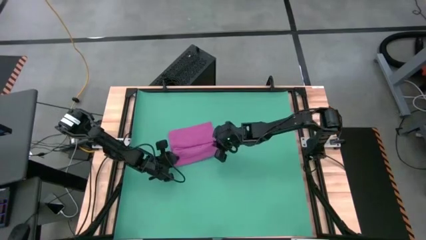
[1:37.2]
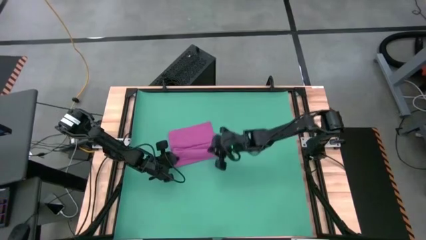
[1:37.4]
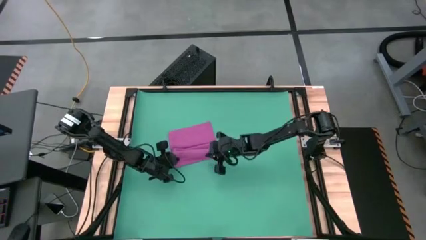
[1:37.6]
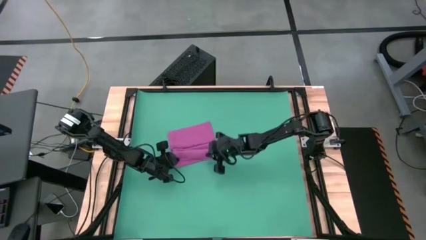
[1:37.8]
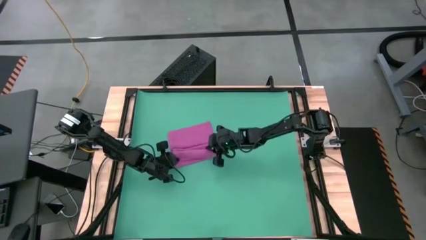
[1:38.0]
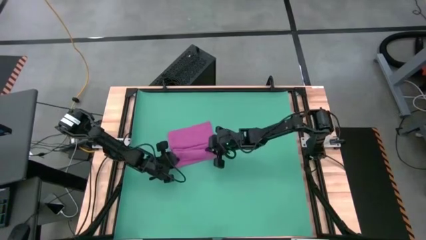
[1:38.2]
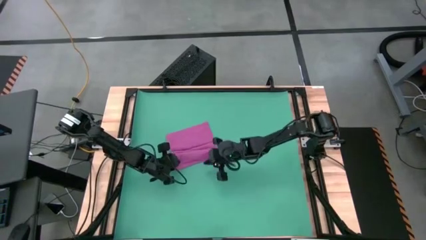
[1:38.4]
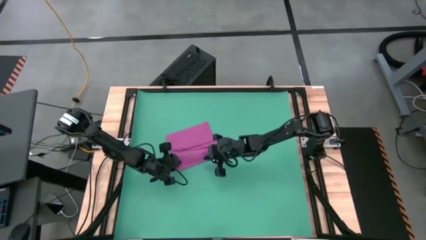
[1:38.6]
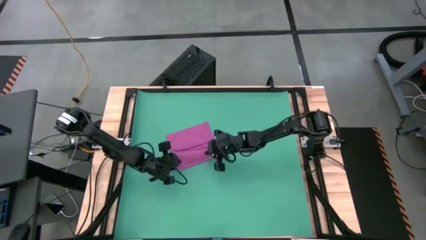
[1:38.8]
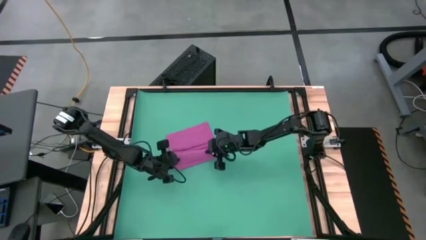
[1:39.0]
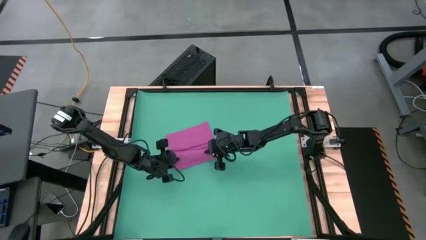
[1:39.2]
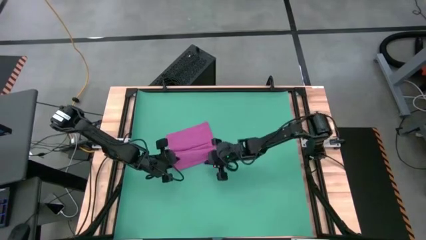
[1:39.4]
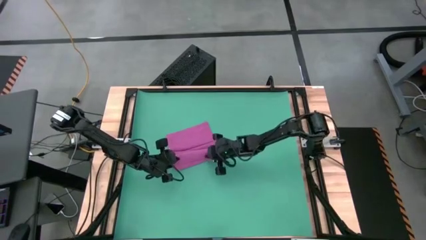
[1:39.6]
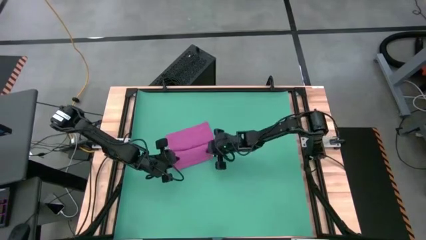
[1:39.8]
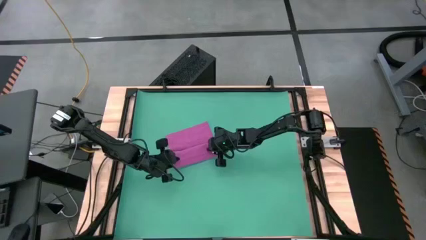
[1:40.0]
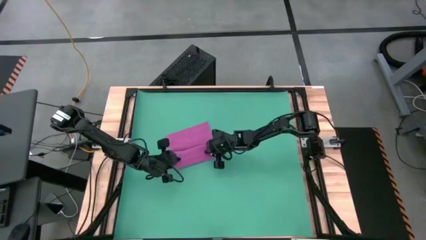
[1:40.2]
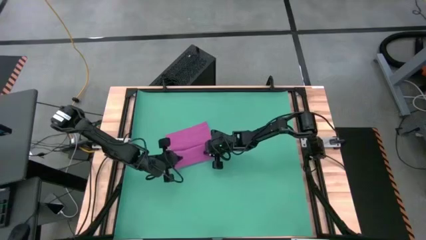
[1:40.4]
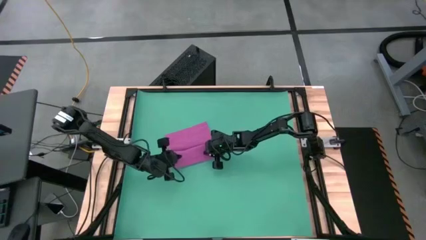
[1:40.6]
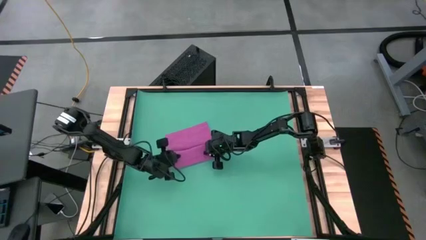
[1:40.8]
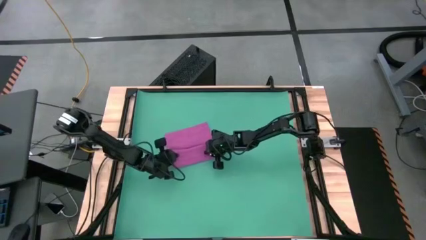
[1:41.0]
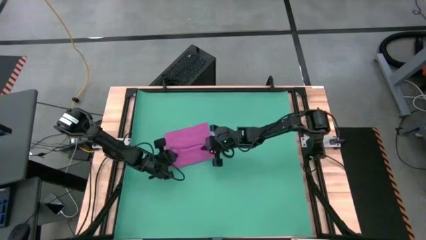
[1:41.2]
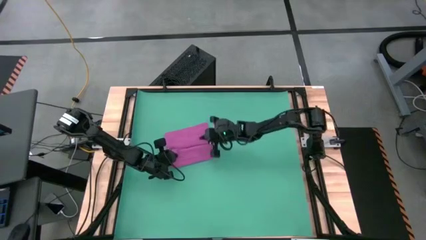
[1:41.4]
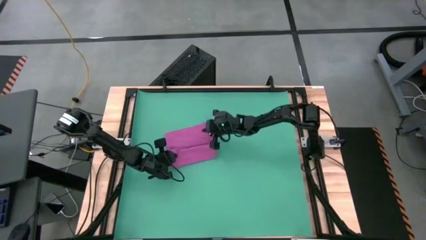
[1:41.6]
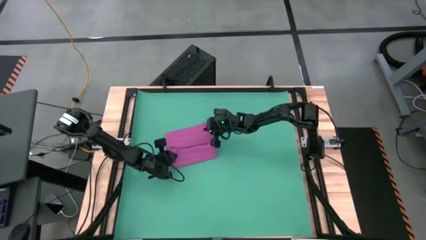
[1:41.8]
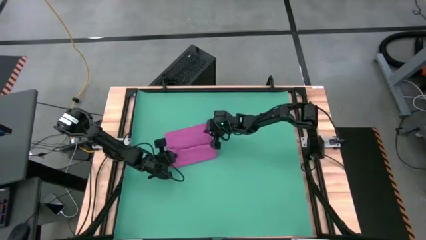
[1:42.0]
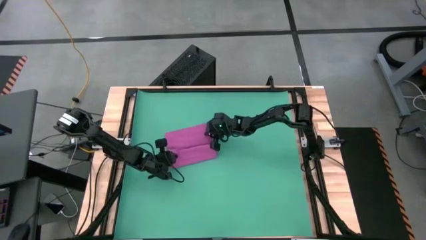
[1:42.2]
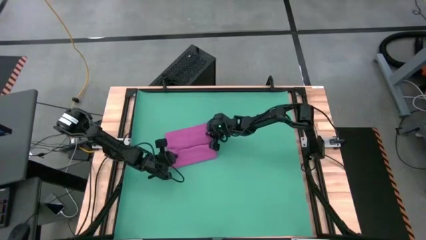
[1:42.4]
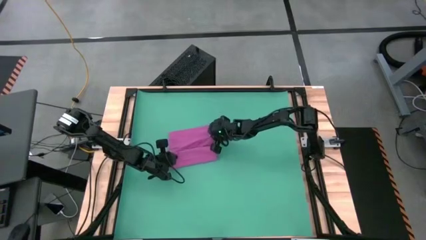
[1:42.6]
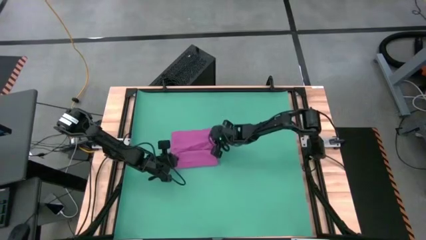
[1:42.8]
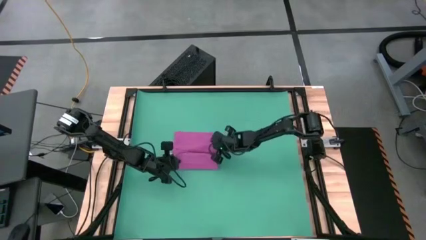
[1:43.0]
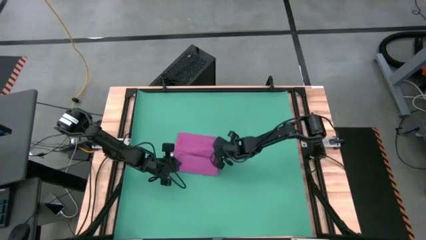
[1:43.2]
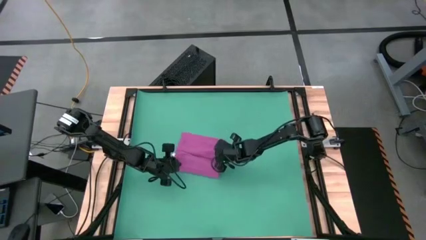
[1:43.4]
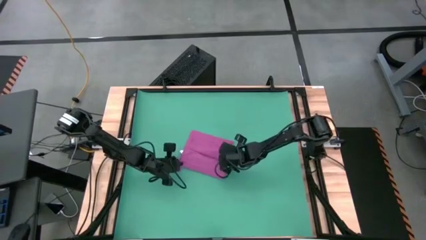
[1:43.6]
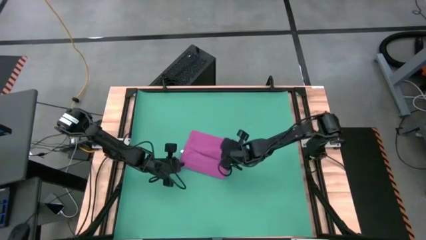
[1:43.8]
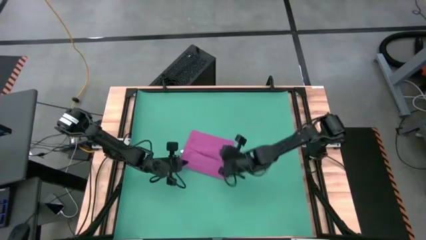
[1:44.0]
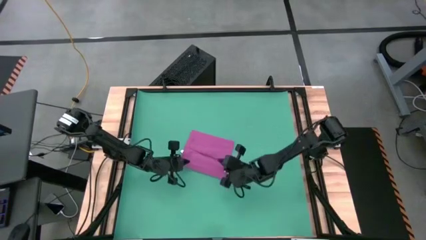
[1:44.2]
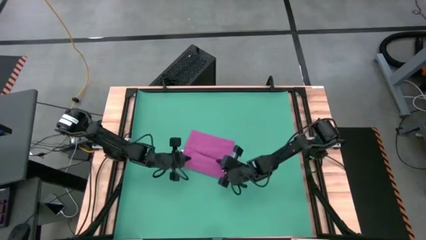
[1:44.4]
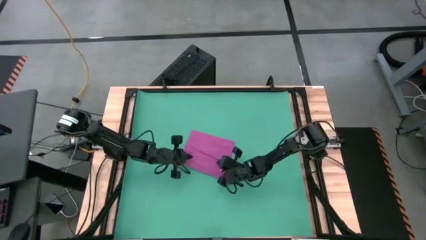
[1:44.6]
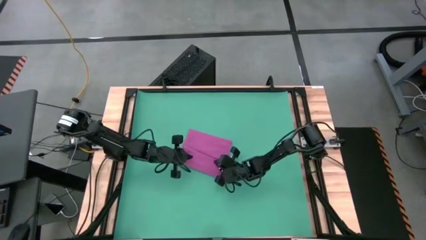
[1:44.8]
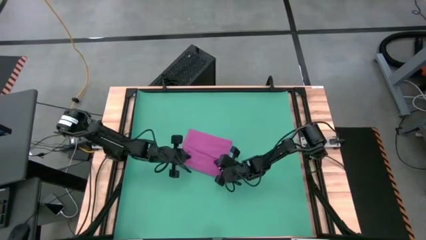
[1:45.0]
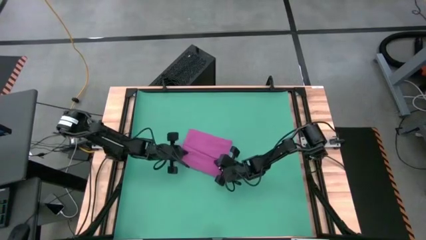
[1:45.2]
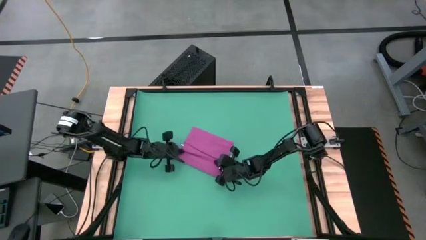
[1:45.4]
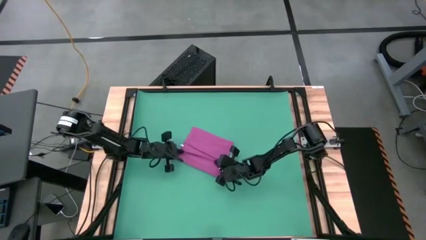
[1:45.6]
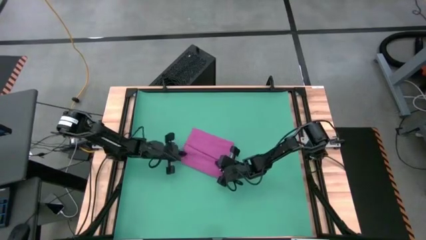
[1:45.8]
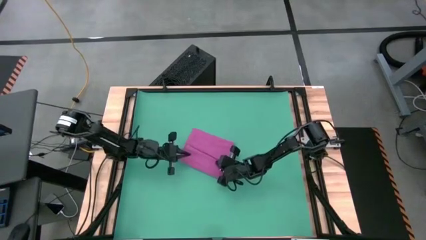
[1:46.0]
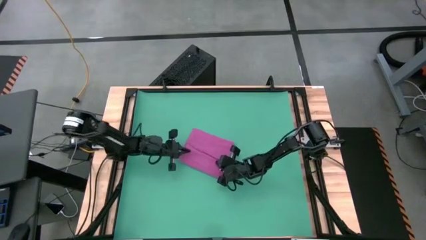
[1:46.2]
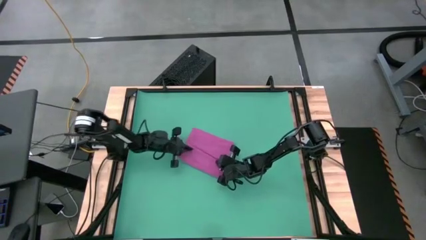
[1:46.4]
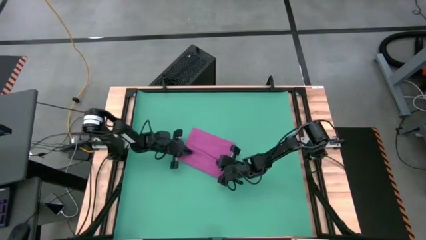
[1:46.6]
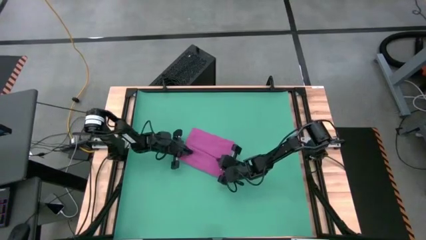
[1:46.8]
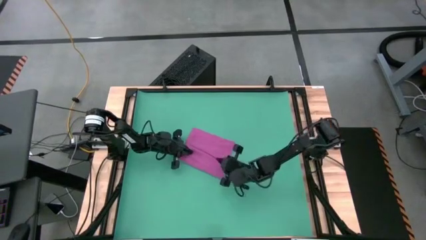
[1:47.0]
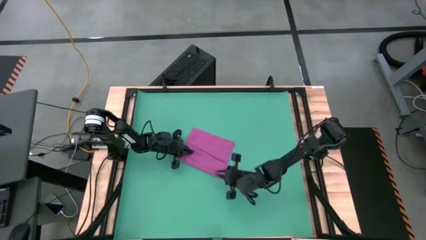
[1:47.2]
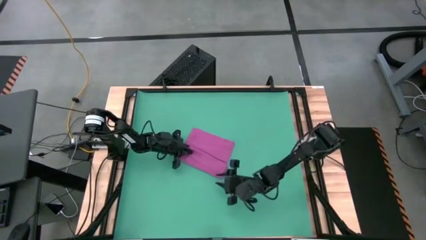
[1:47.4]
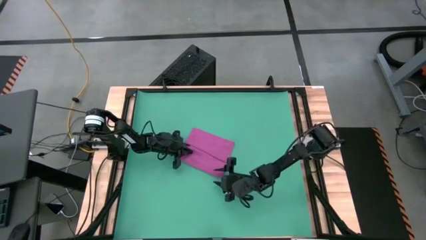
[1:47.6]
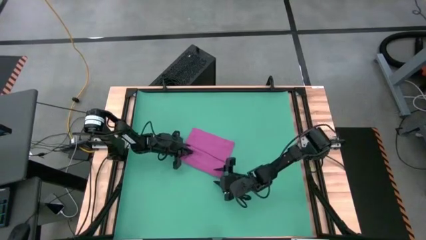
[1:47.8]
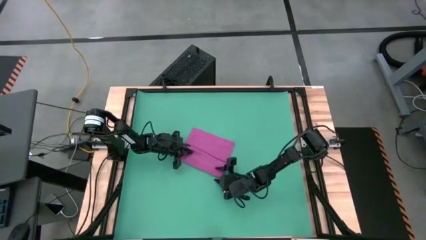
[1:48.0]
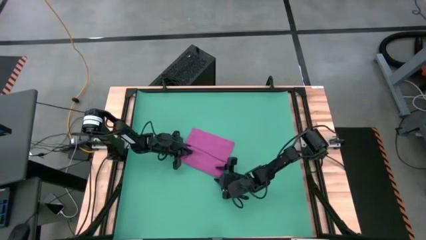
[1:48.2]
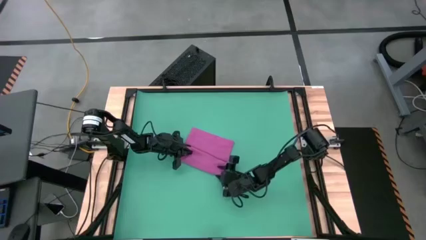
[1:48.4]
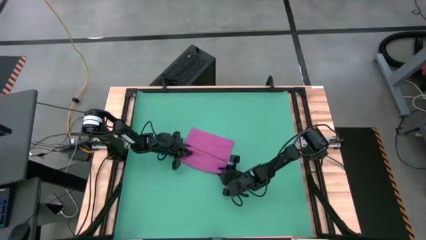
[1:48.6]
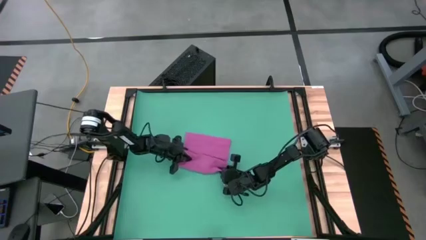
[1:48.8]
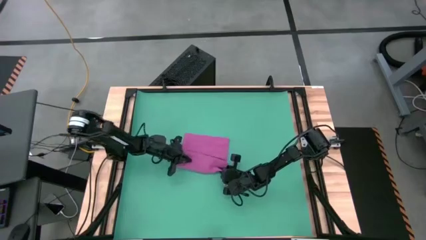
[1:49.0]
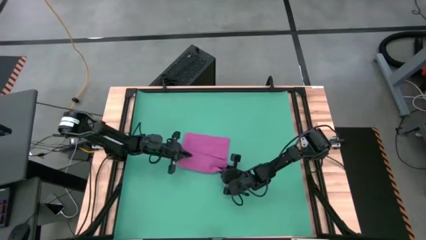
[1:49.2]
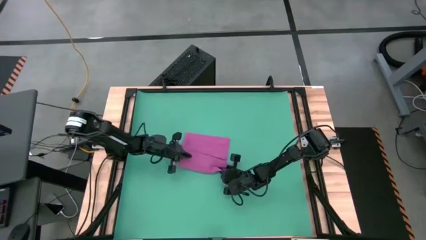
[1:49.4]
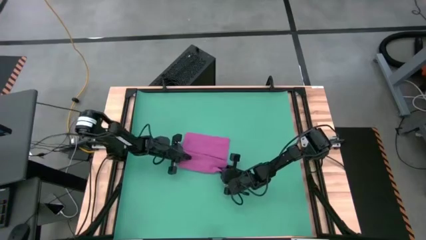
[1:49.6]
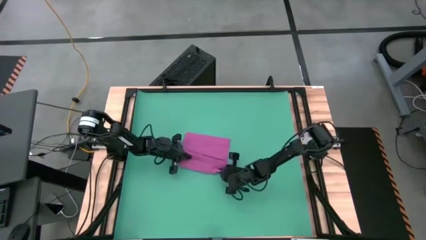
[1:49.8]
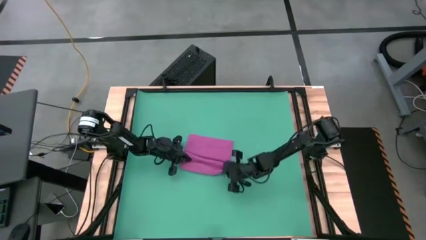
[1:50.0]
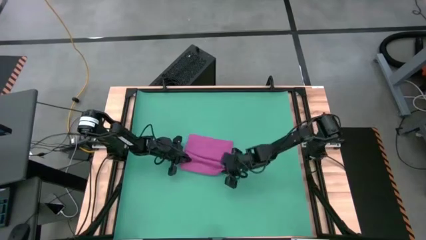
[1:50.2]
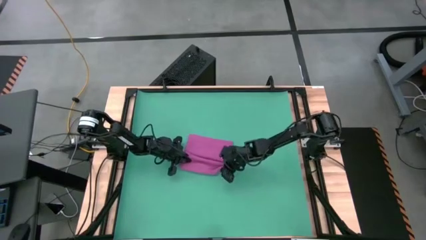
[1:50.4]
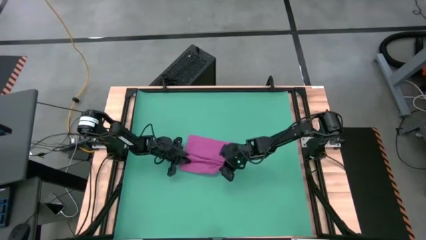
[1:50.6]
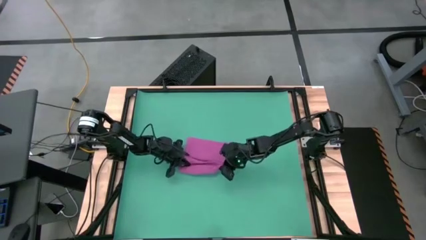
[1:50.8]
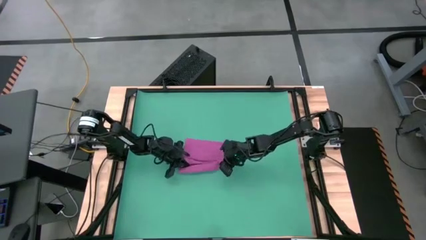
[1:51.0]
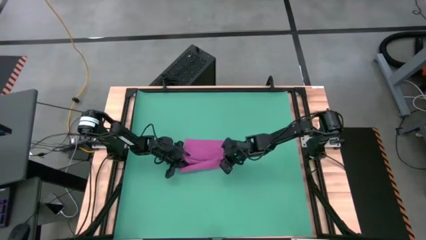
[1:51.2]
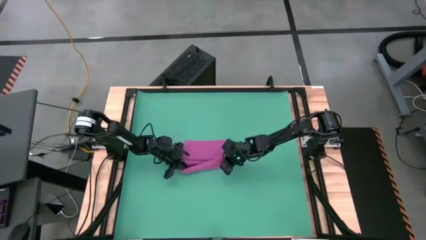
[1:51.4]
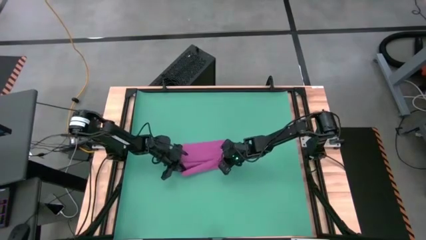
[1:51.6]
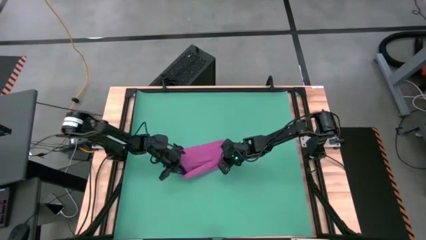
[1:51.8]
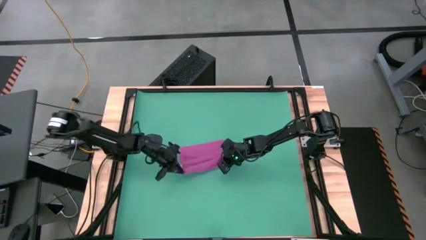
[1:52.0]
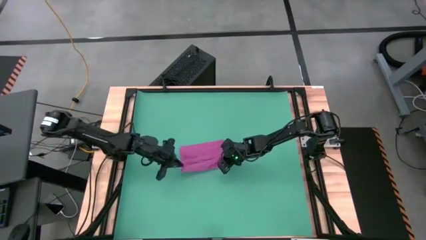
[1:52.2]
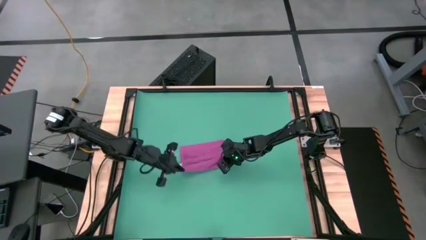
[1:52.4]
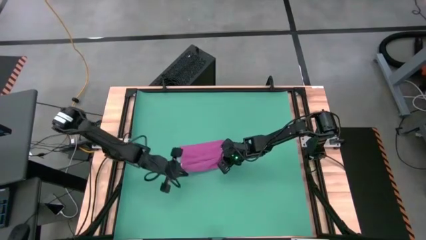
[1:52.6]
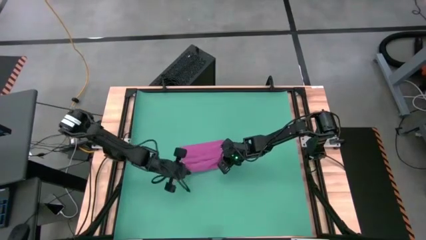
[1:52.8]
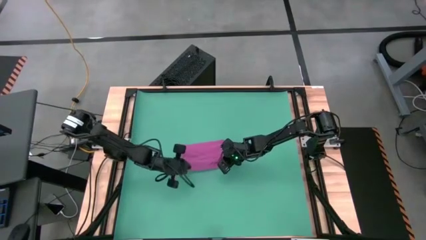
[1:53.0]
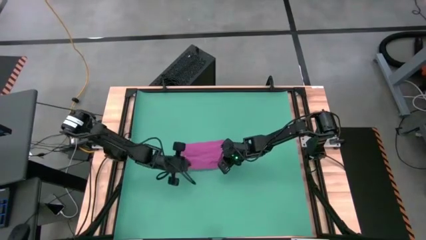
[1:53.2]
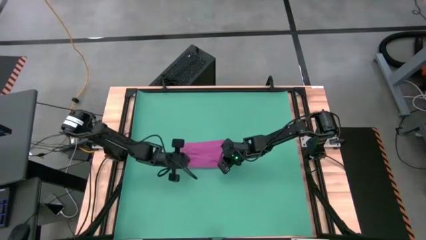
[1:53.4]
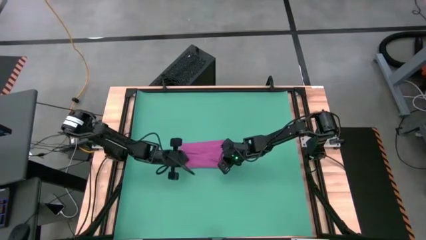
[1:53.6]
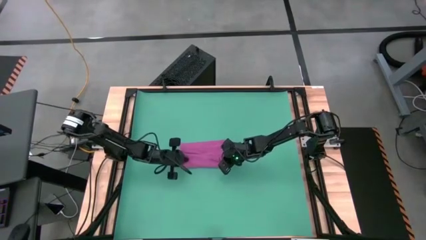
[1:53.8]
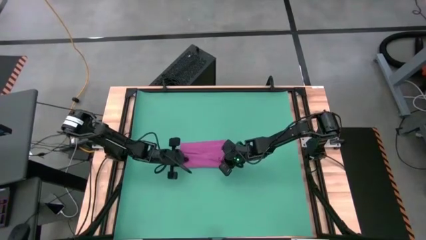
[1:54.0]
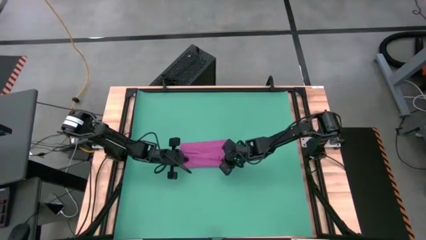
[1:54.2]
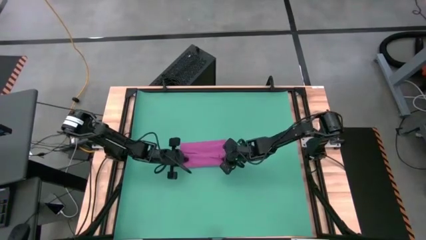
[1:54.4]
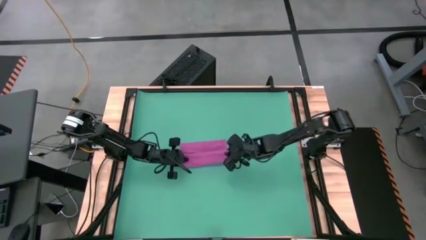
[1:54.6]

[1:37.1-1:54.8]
Task: Roll towel
Roll the pink towel
